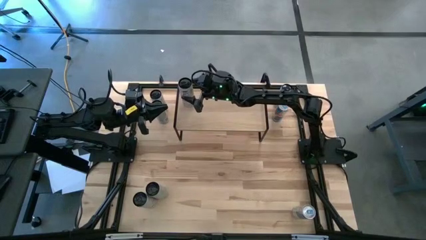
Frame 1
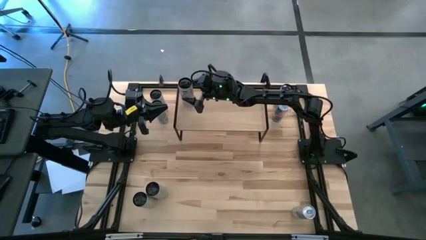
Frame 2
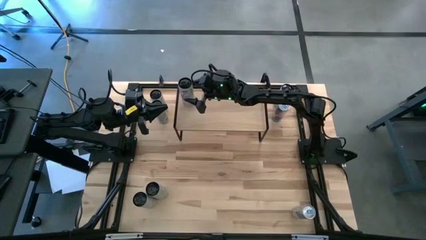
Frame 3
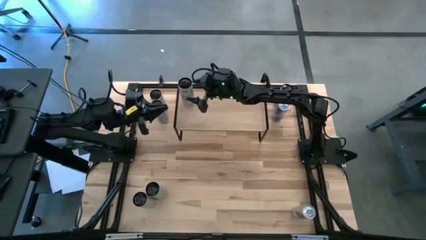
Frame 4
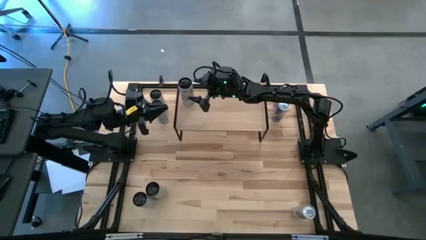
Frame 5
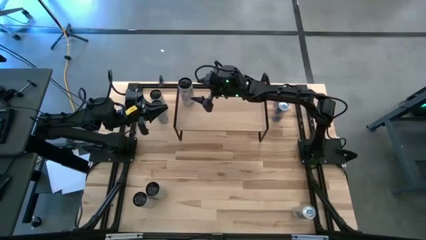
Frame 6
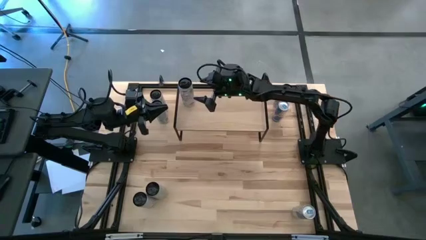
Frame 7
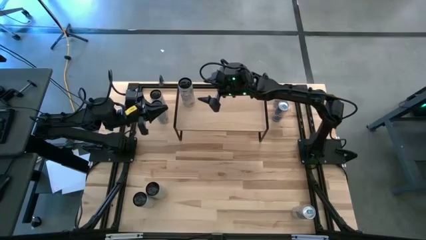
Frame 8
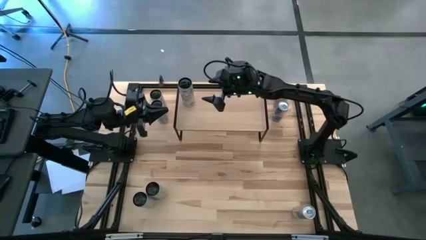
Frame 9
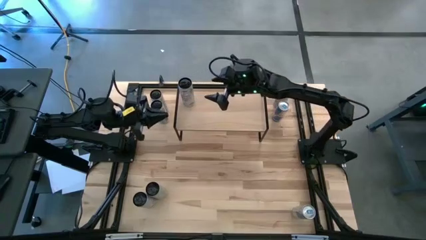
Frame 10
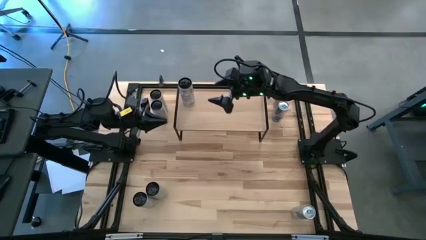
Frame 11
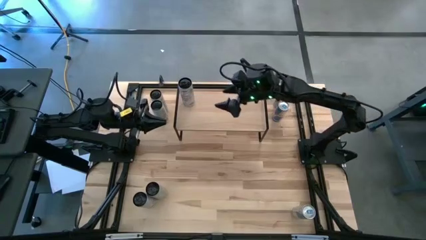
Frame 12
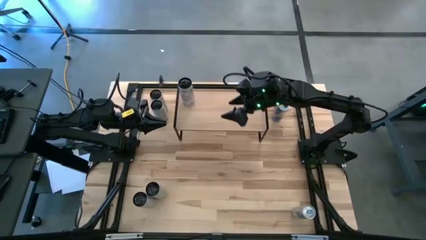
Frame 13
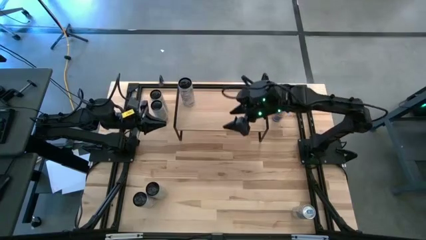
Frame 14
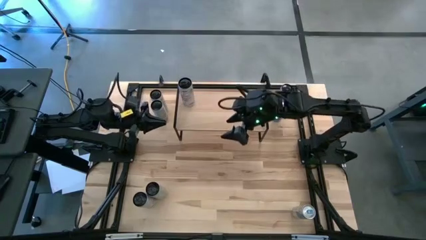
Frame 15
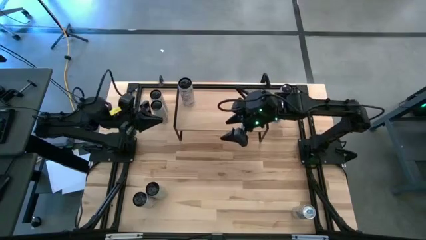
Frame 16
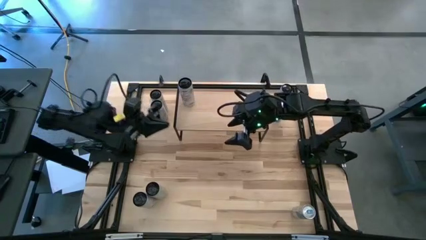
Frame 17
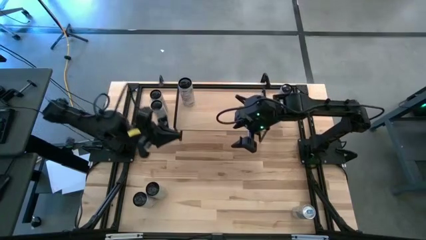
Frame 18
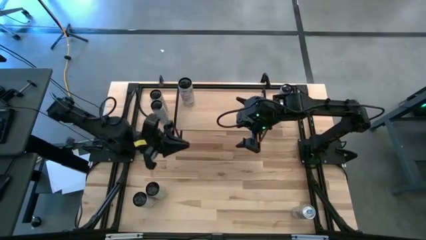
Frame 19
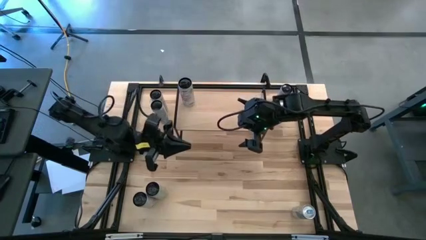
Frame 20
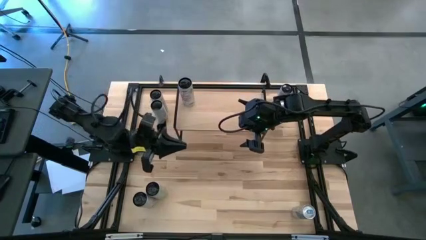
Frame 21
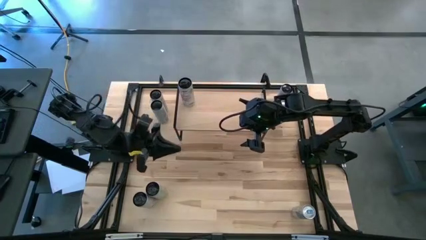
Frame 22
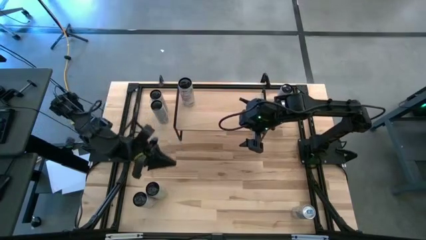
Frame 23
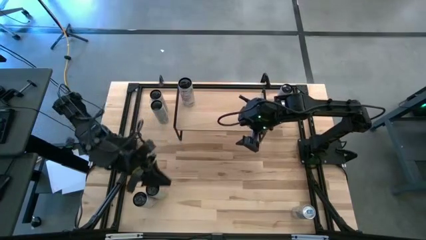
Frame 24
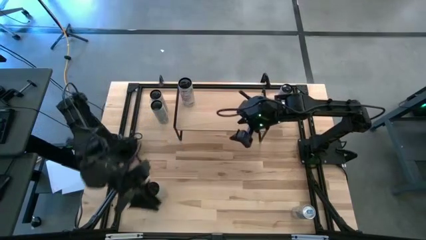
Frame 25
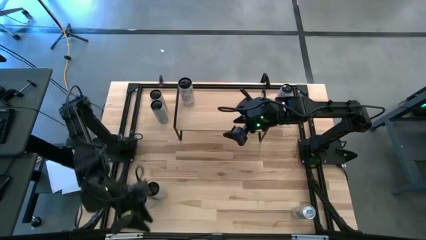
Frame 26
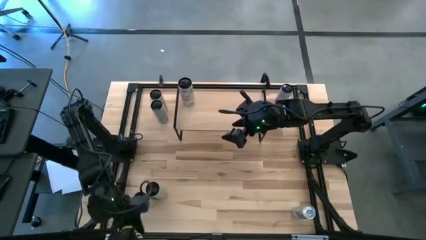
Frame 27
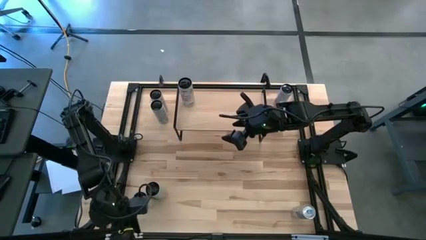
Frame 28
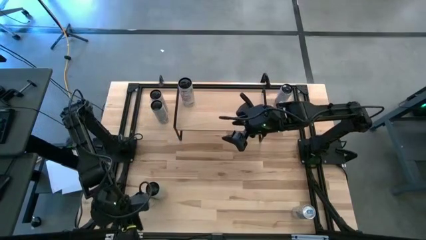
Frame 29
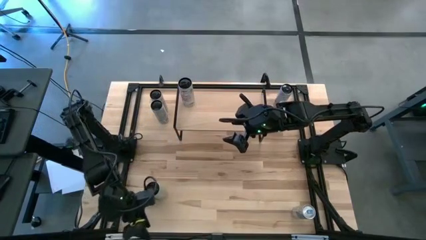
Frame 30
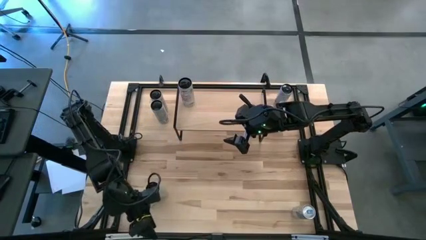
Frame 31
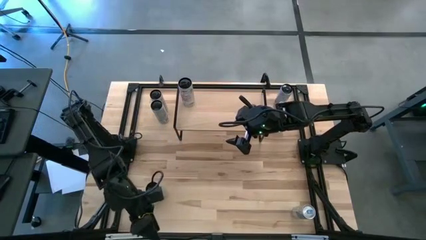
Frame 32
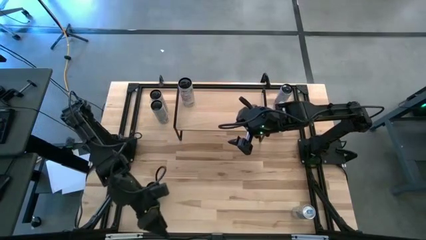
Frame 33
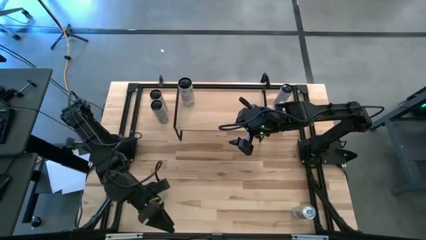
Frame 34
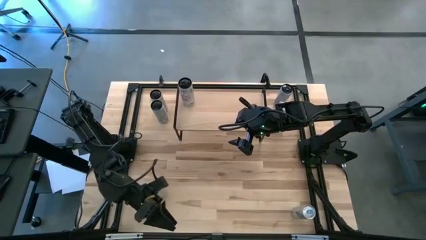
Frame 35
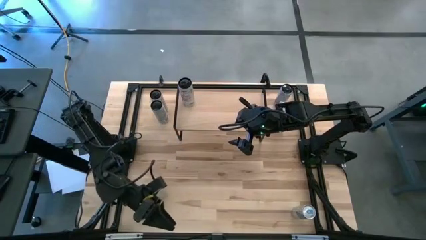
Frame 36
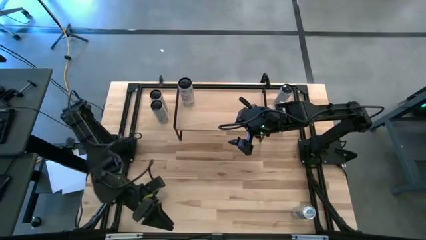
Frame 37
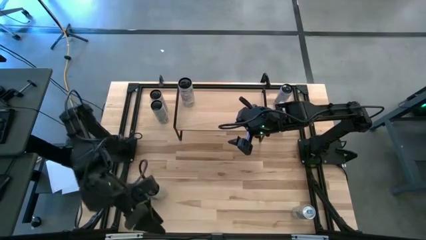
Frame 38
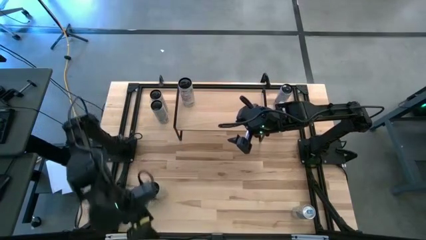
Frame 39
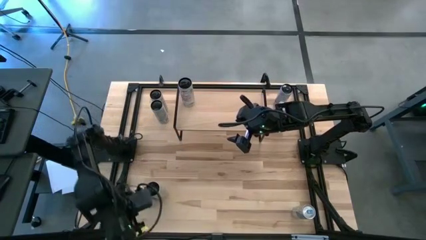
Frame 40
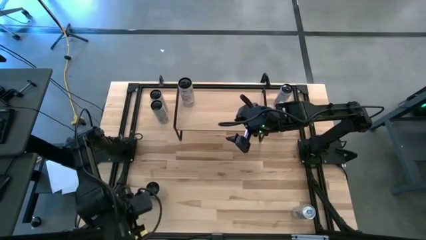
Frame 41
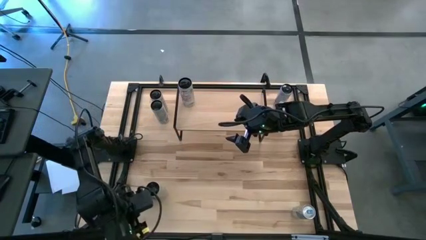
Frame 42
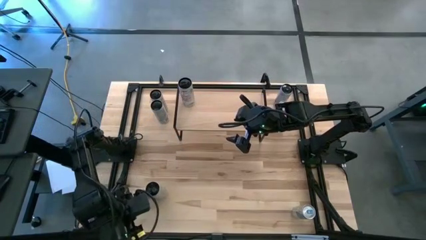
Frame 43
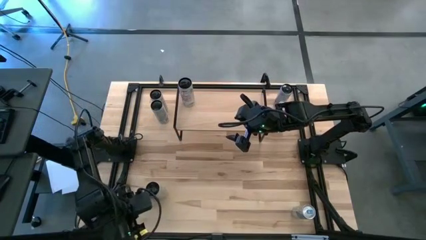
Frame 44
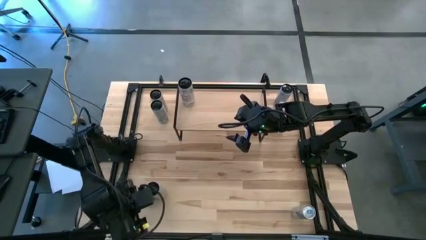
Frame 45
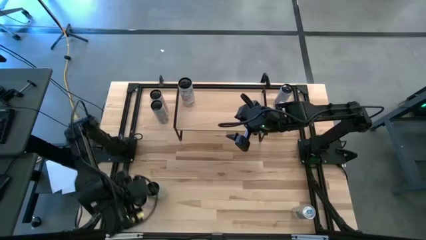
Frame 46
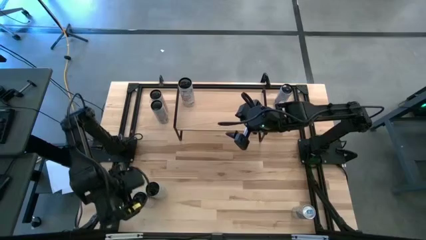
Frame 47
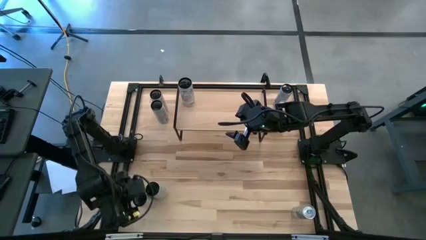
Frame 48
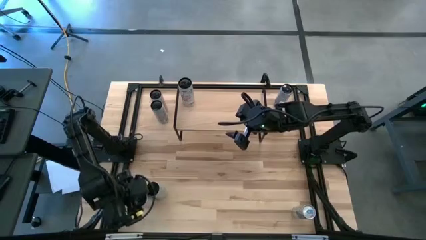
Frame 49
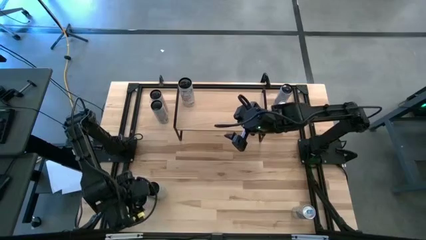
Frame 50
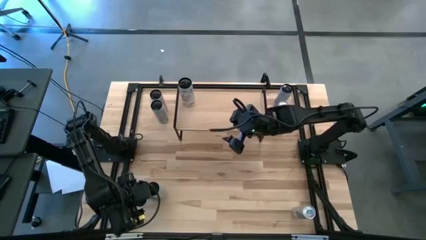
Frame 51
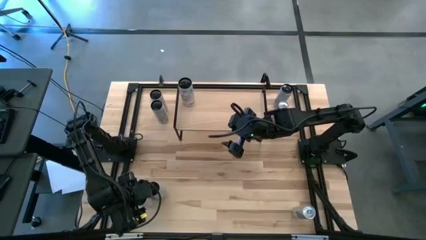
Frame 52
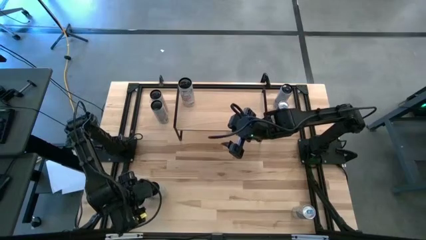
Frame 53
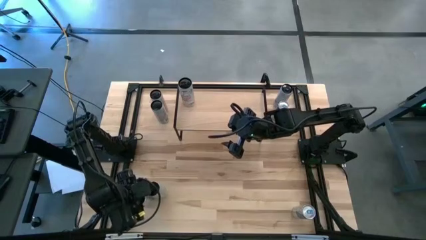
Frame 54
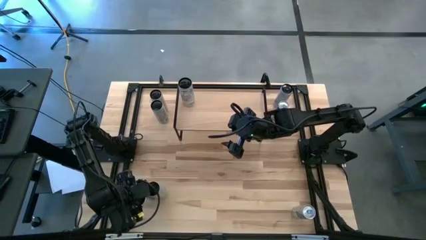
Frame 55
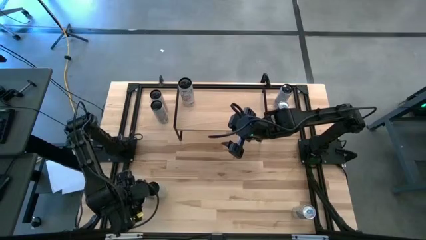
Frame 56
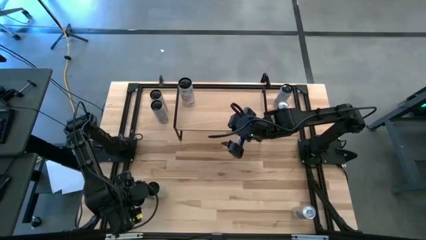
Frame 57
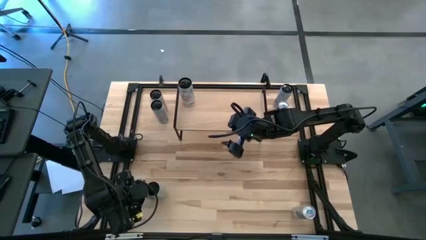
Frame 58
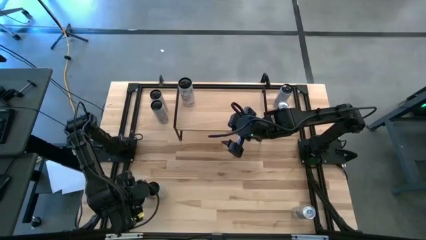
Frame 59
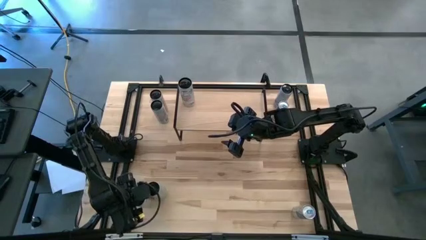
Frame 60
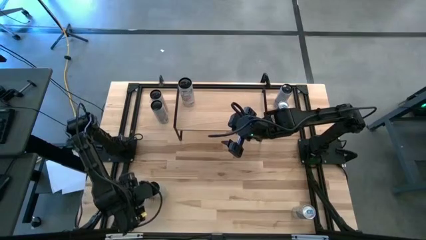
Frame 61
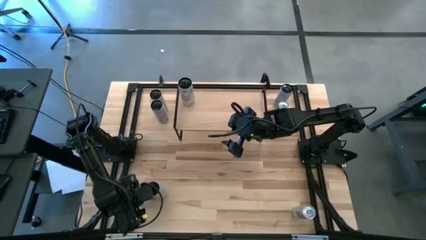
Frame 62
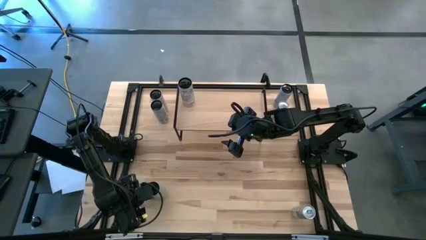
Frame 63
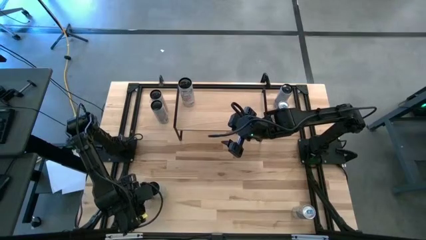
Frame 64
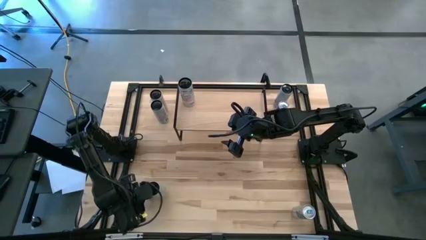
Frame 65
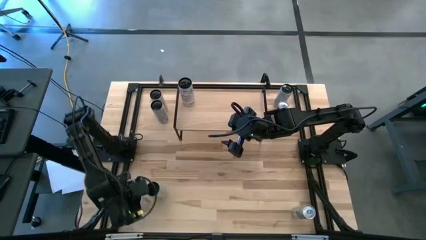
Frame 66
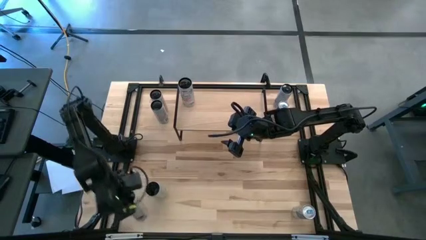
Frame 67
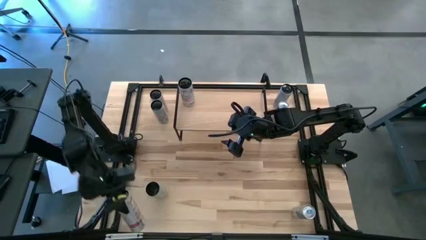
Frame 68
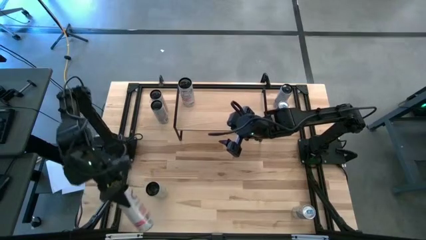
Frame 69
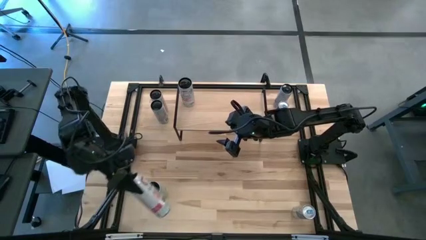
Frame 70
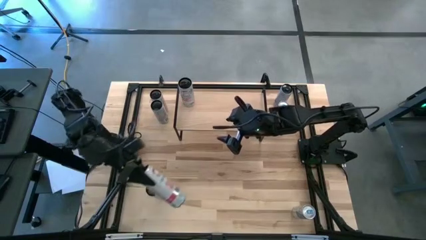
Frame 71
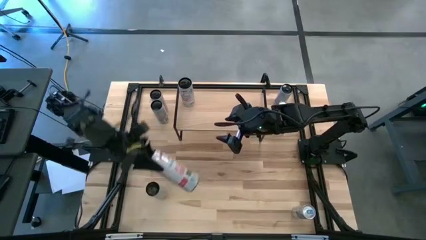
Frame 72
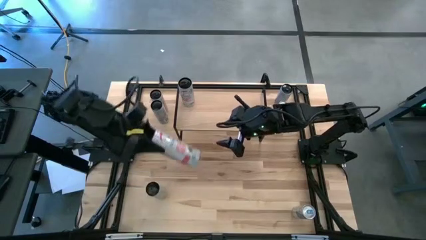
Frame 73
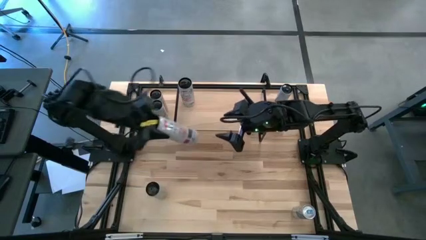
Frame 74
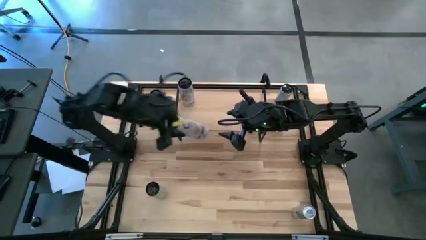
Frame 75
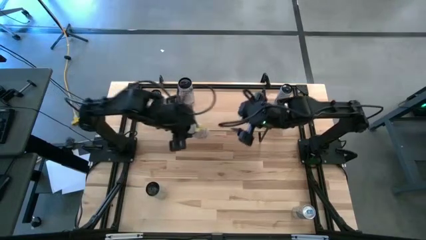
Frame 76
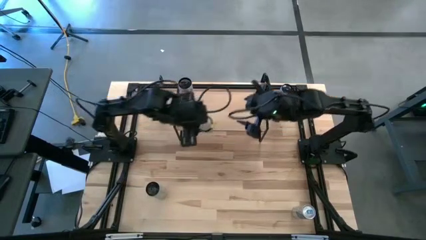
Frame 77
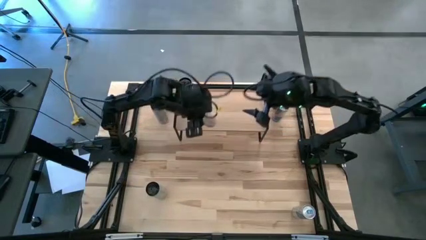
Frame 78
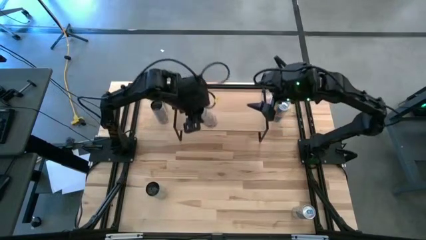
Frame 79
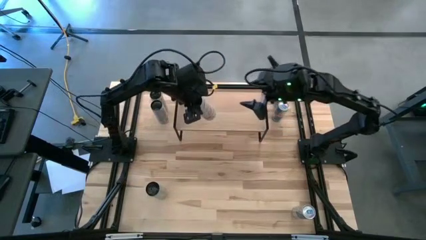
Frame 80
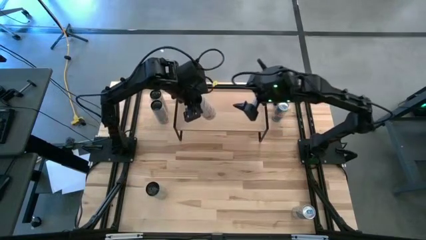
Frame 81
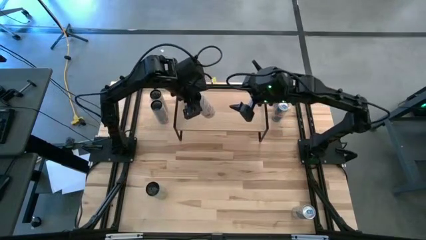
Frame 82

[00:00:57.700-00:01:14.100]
Task: Place canned beverage on shelf
Put the white pink soda can on the shelf aligned with the other white pink soda can
